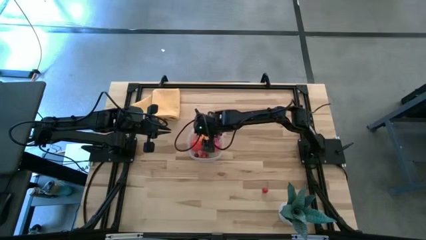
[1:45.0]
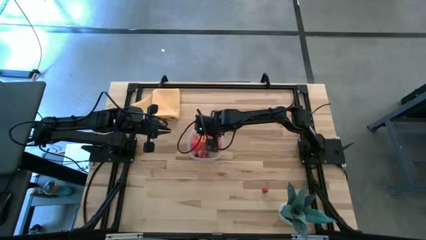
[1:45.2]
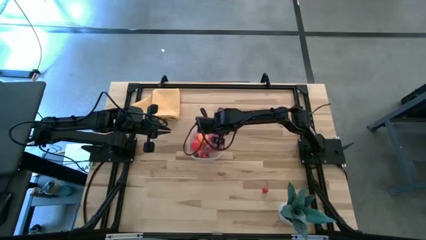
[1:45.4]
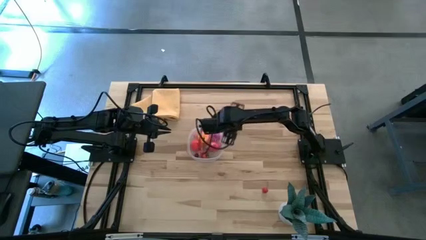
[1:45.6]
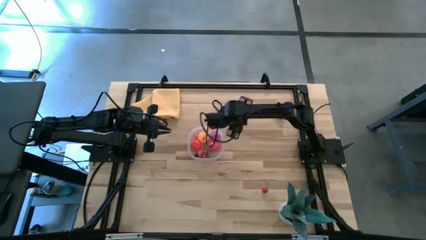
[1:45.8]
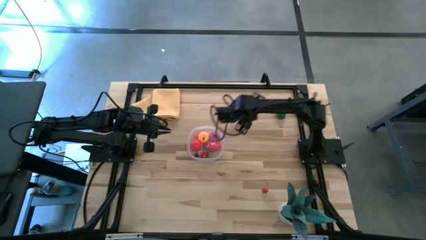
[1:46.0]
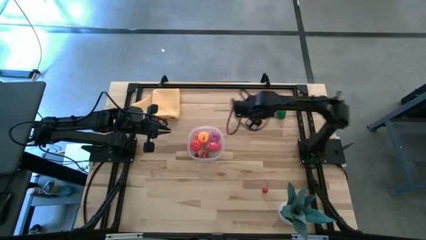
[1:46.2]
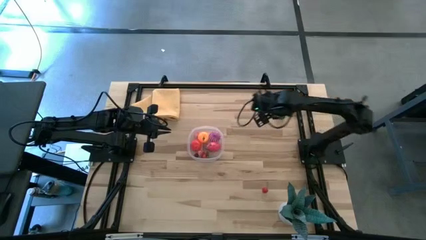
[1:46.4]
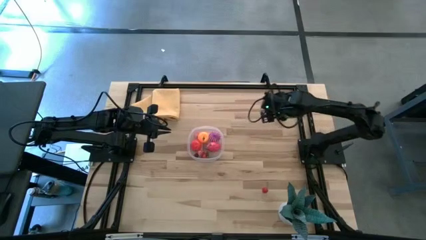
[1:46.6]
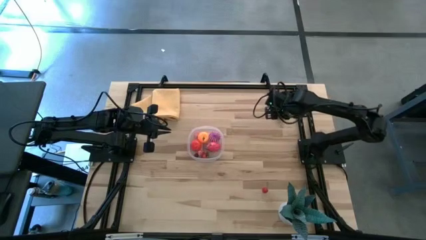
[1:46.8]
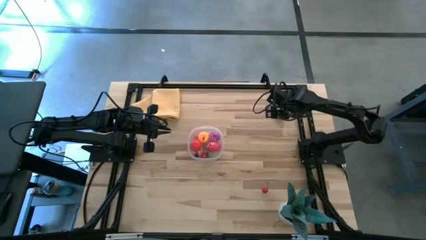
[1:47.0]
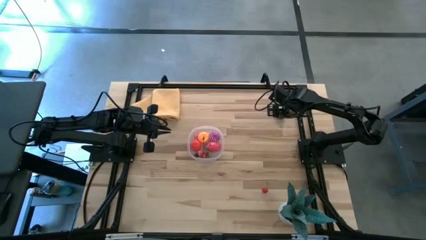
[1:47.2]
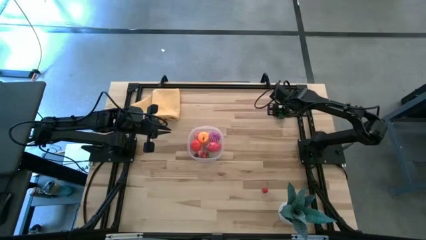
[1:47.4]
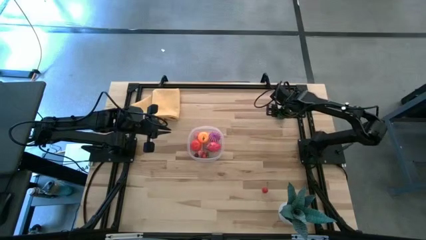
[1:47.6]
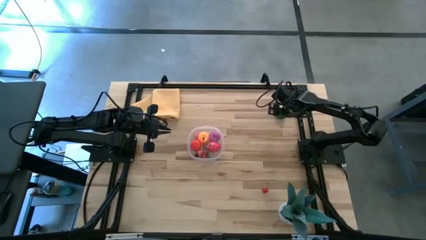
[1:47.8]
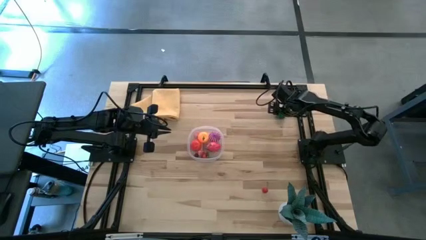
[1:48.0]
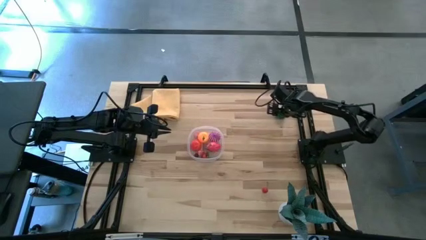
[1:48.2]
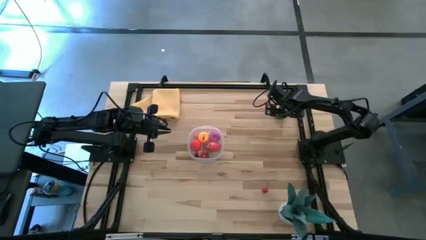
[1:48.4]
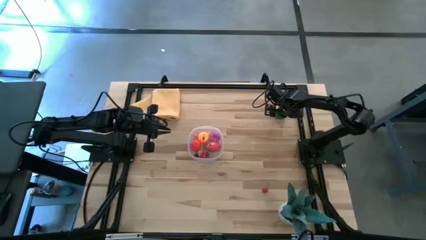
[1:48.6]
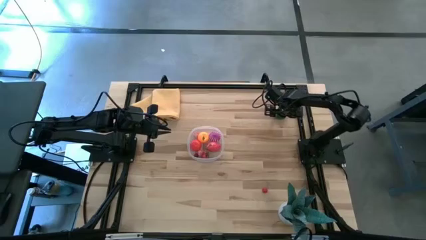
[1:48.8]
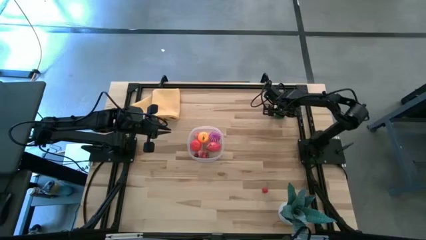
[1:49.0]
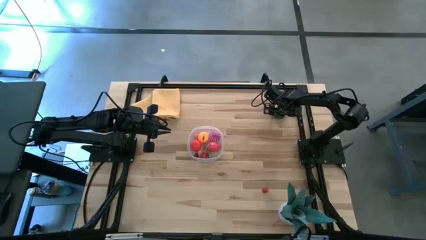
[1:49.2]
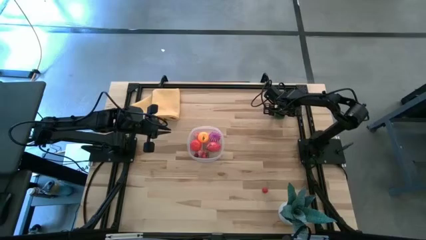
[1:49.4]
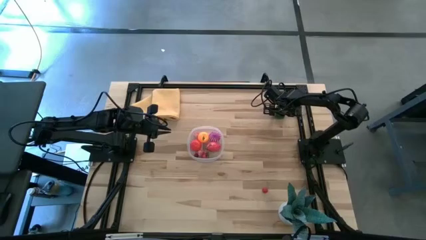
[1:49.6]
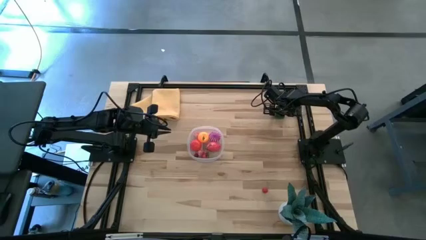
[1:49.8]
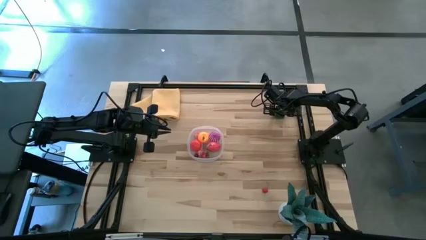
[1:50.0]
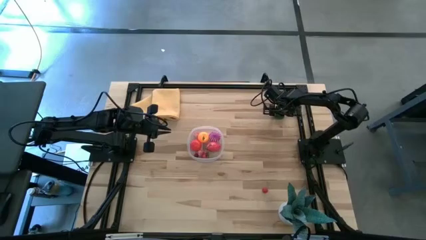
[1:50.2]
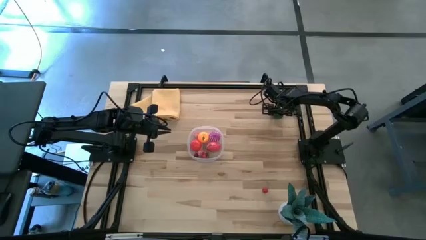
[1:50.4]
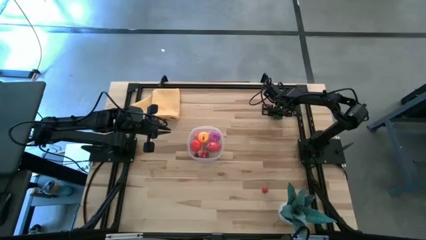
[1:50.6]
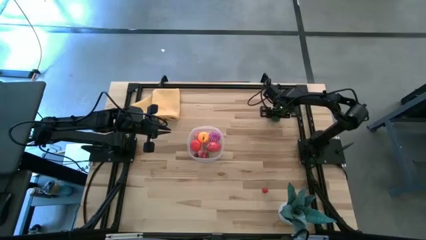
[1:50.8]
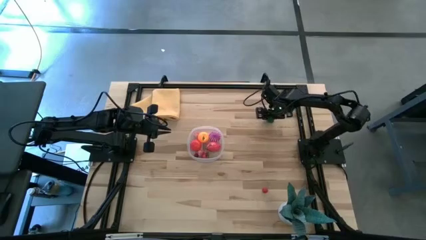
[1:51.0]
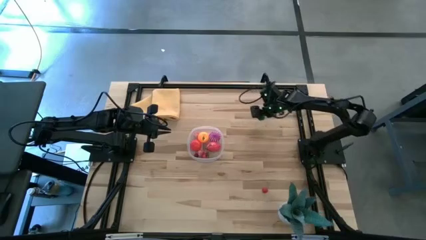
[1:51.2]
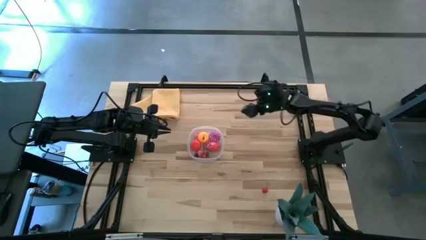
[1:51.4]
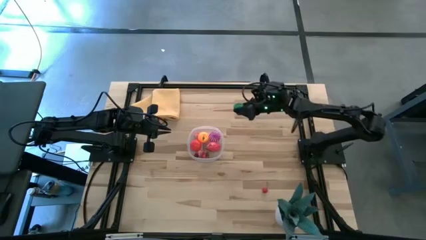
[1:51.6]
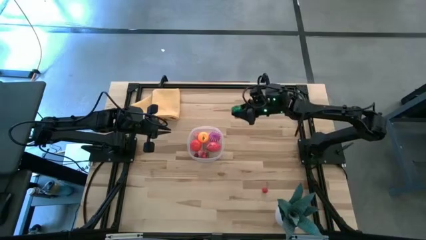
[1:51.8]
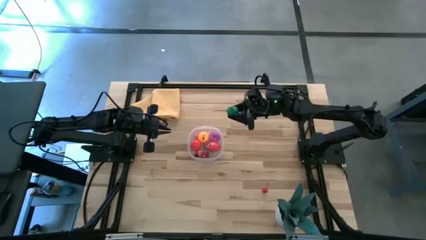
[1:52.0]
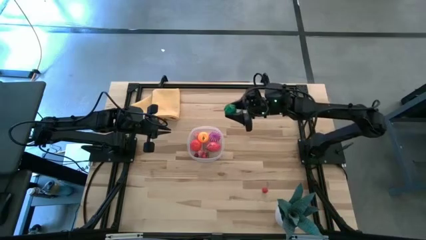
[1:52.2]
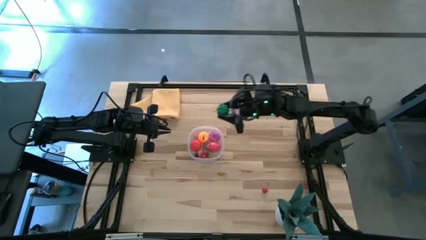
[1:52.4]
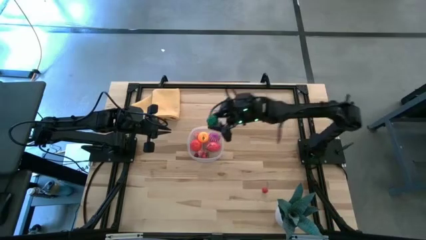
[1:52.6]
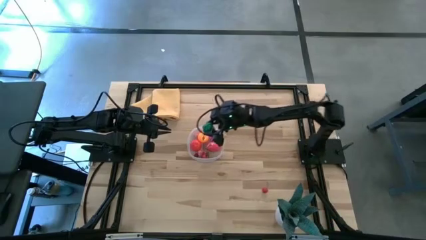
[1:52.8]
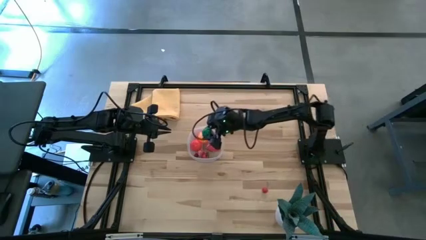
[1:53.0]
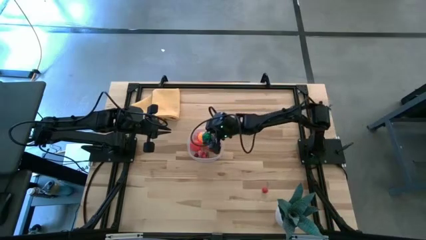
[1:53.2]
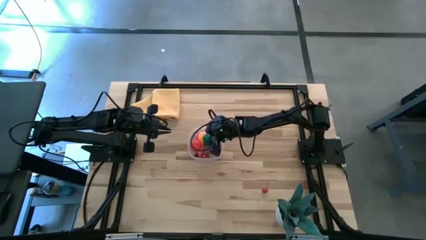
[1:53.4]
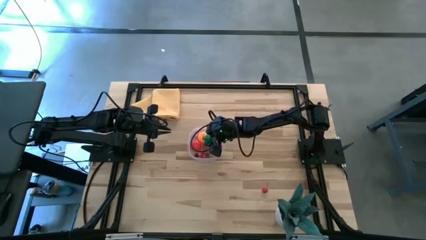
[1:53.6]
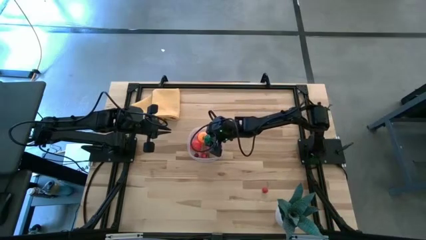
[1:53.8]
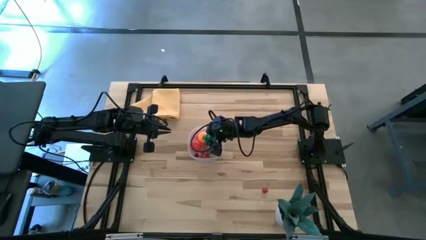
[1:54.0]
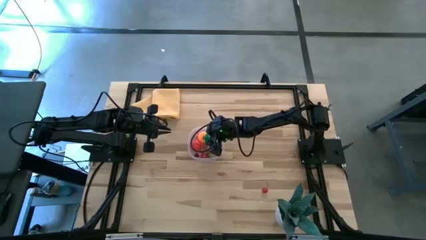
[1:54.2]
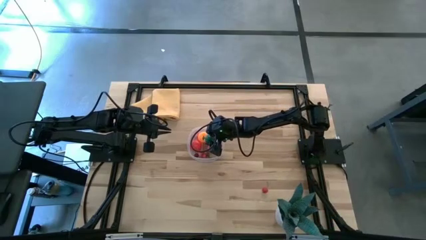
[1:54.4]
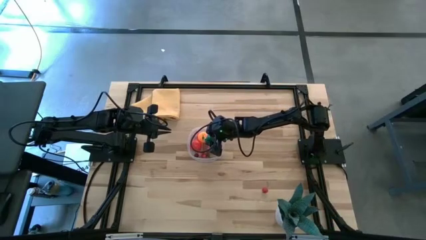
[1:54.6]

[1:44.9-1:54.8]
Task: Pick and placing Produce into tupperware
Put the green bell pepper into the transparent bin

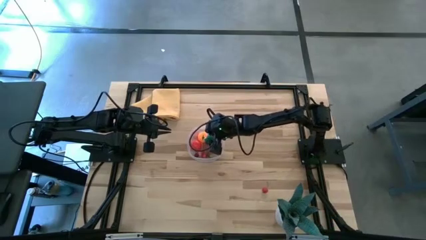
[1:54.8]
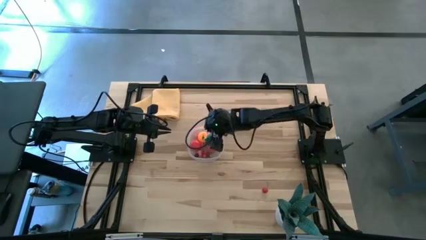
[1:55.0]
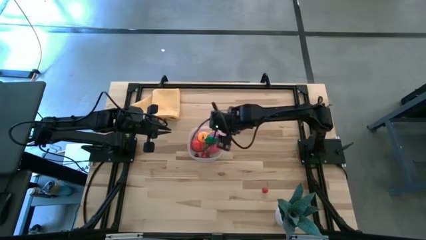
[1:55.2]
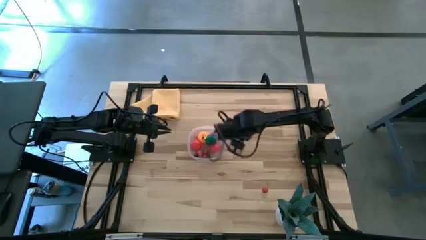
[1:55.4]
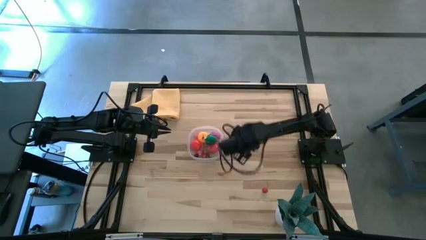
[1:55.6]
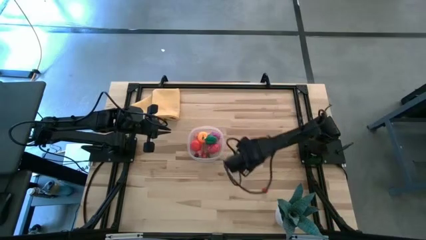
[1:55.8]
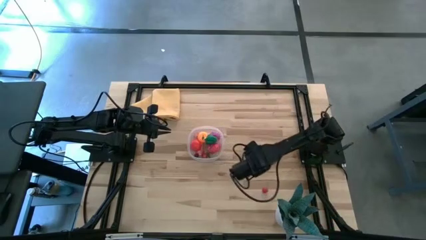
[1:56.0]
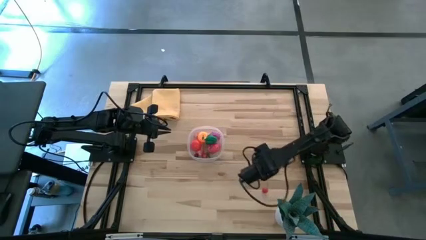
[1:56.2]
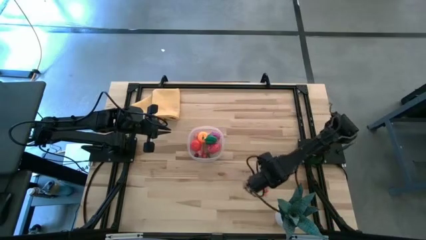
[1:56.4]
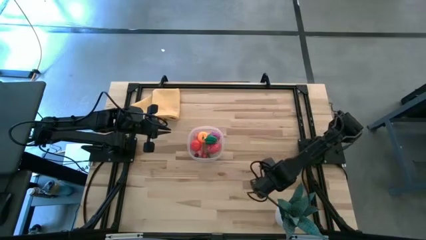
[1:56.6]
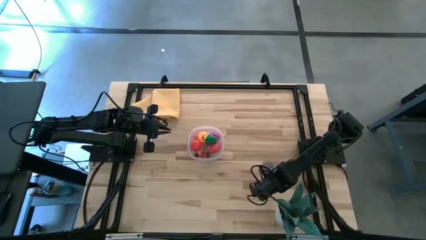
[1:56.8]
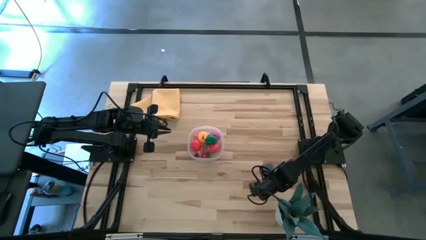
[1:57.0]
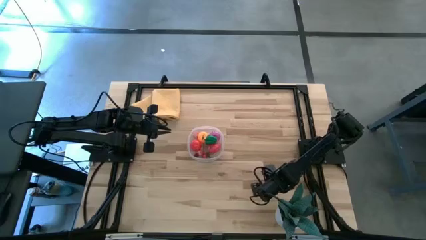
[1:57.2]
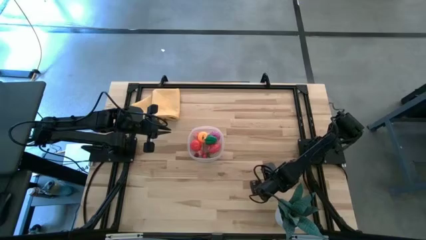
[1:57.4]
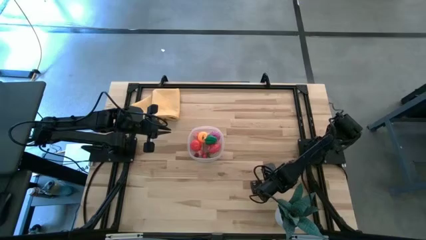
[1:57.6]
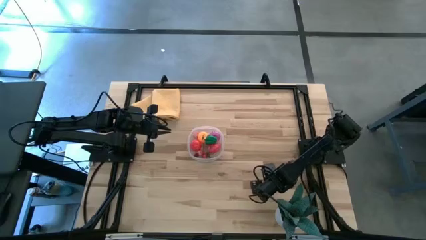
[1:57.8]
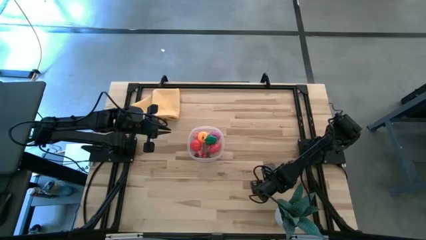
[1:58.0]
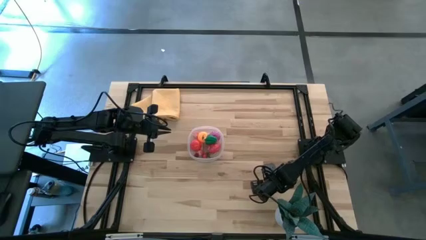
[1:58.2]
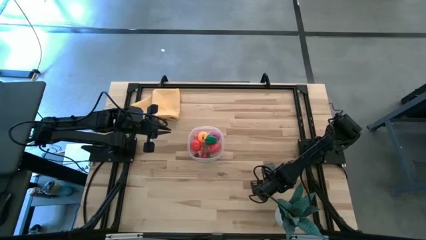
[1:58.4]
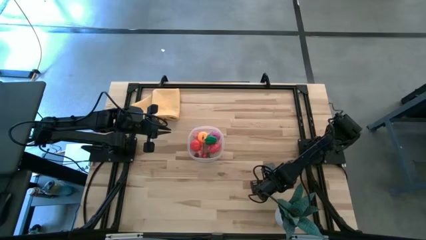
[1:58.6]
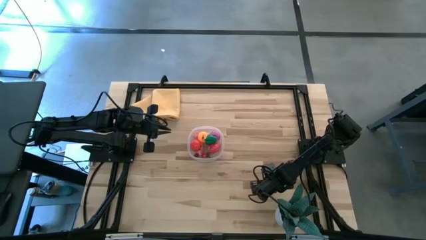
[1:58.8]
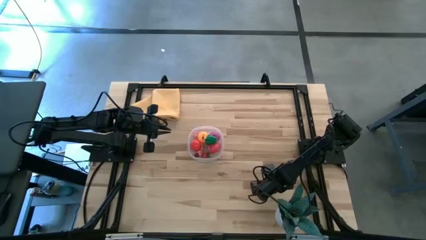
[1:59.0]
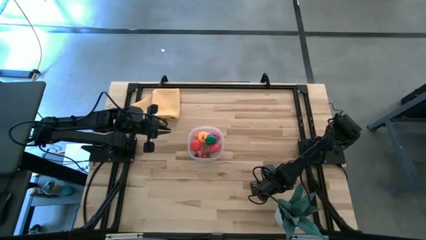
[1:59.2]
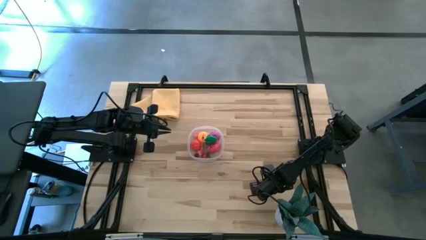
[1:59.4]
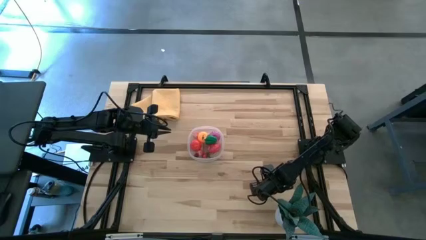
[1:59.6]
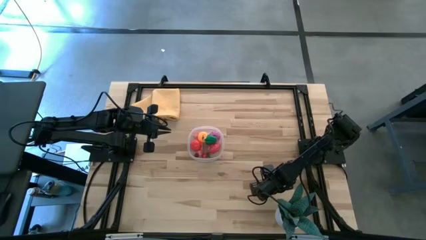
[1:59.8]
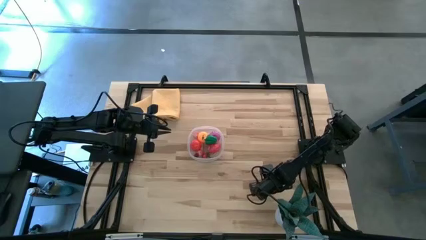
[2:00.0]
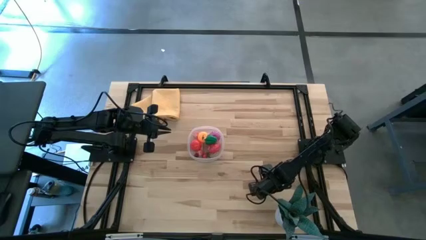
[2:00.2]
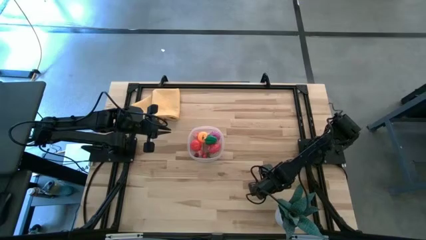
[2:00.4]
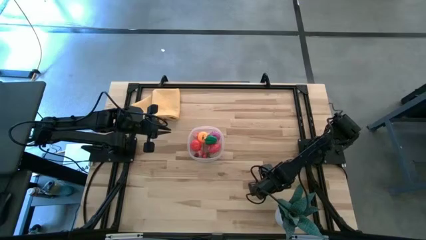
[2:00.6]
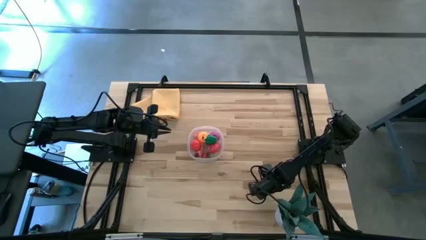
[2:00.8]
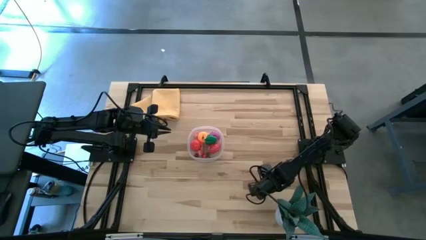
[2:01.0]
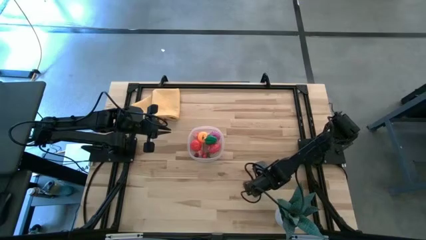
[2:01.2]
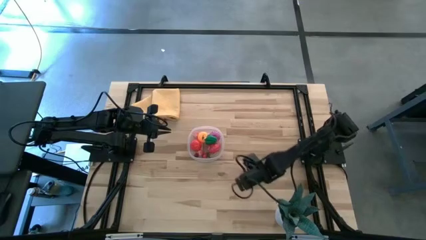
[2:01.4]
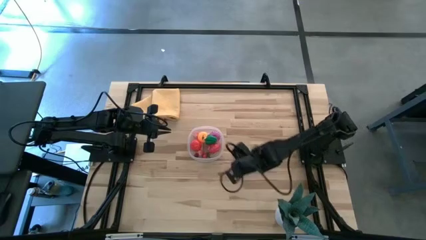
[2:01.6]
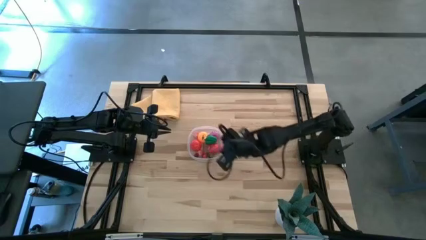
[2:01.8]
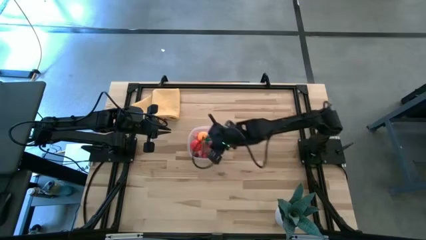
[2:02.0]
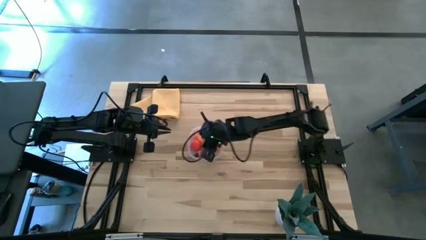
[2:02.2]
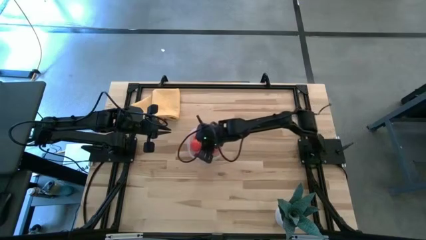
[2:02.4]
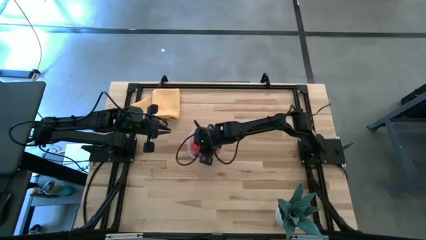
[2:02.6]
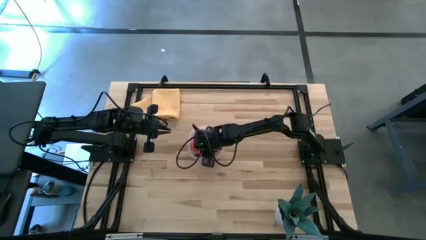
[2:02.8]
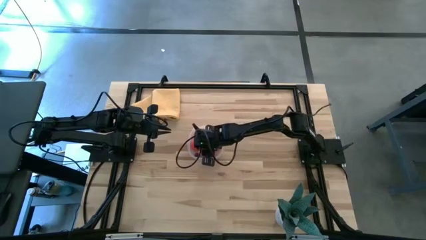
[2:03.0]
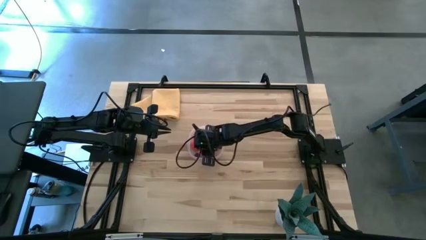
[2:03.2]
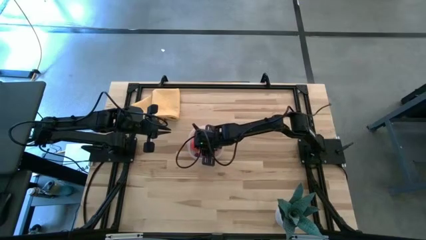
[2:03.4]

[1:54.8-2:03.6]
Put the cherry into the transparent bin
